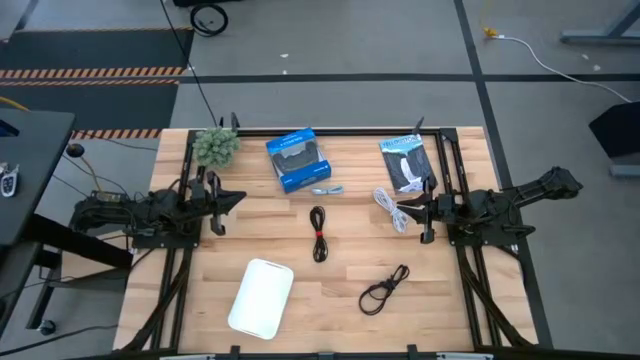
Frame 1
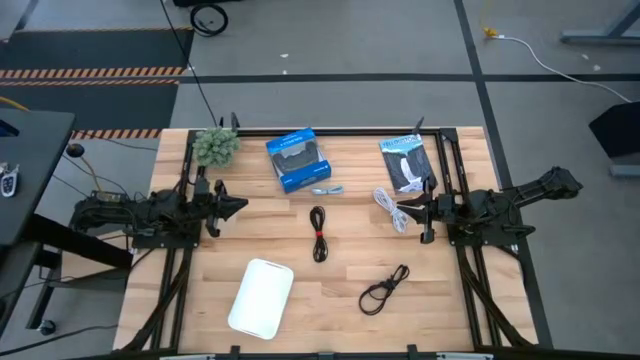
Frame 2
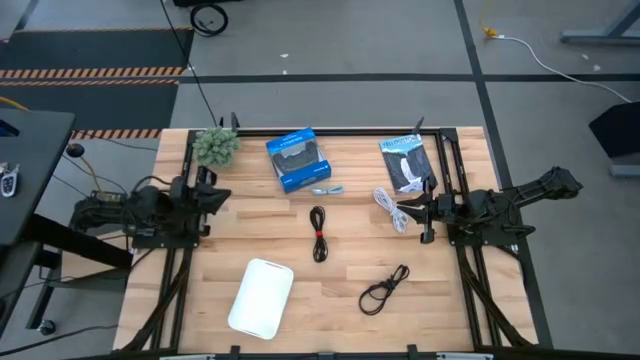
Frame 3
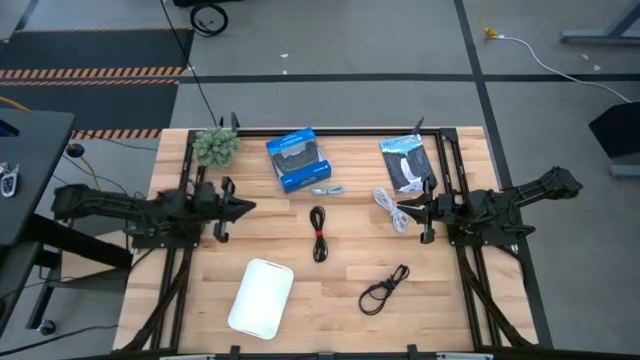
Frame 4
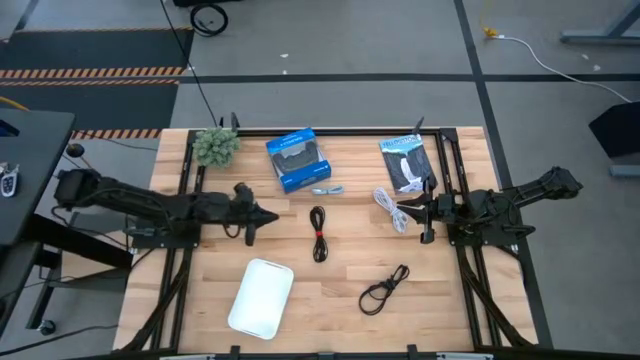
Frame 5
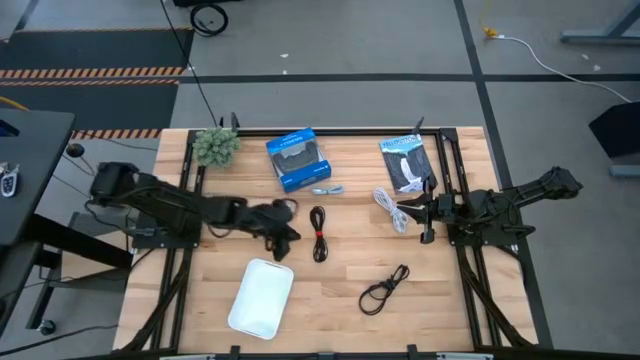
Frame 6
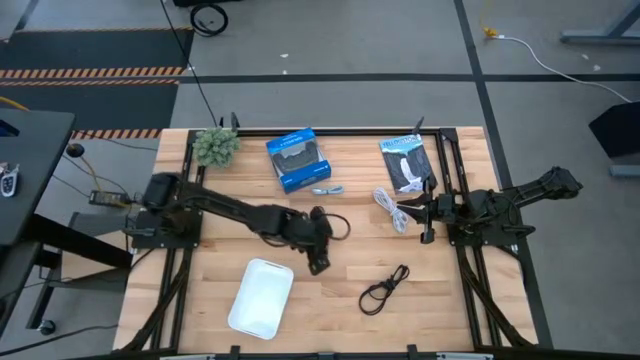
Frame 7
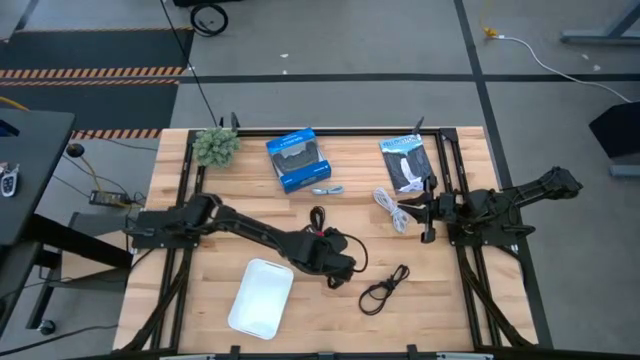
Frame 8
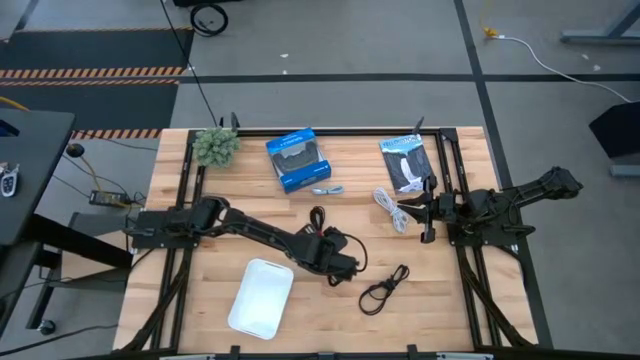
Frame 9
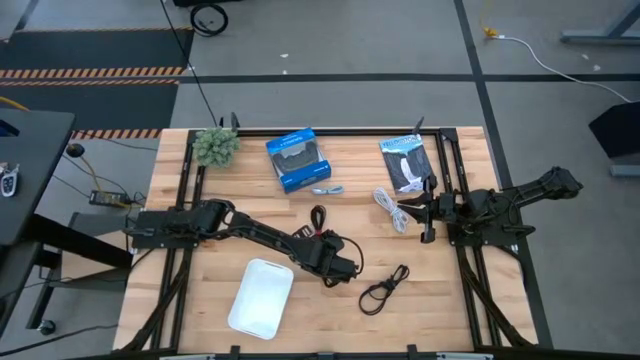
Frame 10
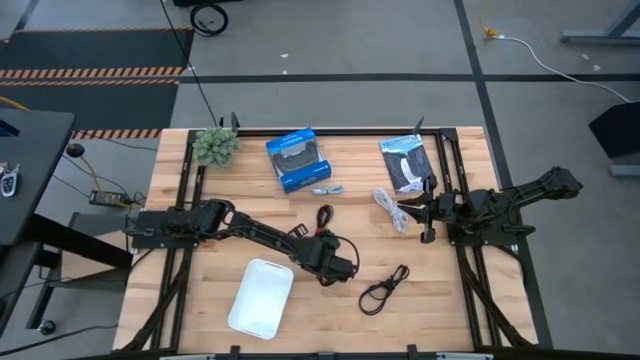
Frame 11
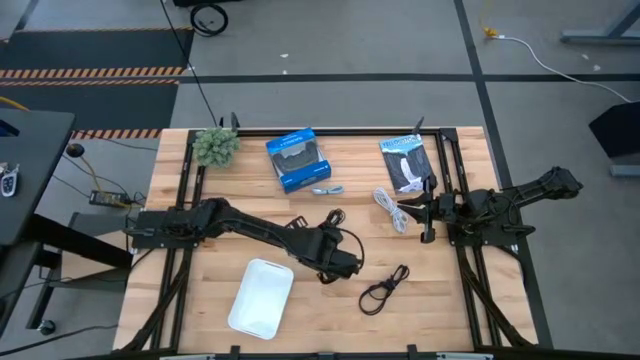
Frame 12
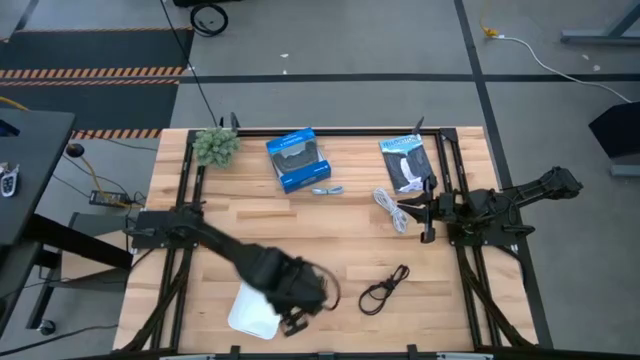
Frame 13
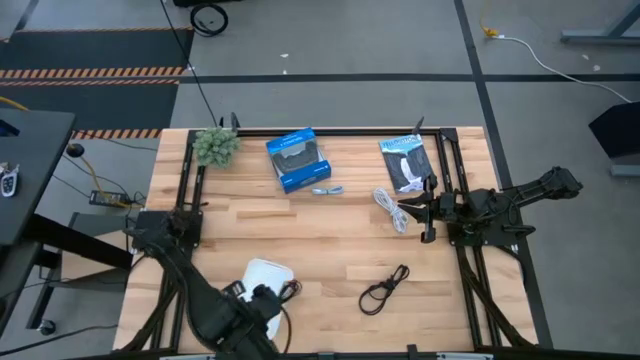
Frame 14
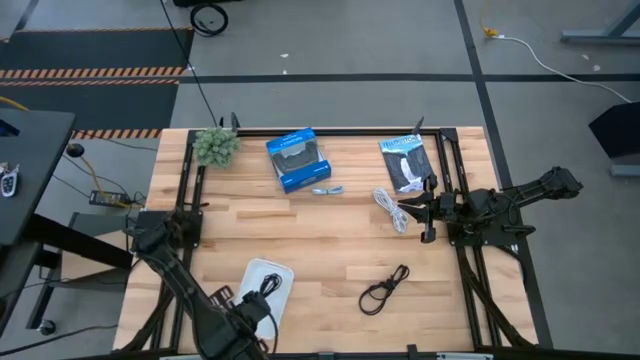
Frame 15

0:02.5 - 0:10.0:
Task: Pick and place USB-C Cables
Put the top black charger cable into the bin

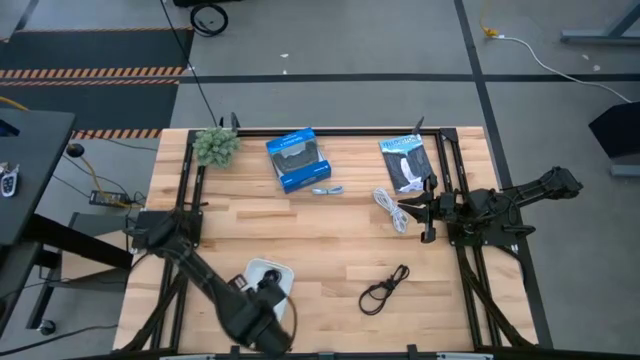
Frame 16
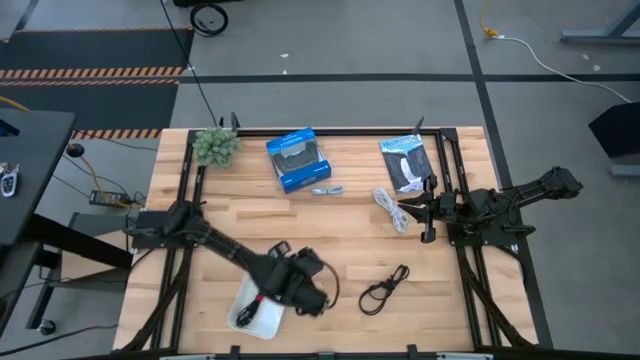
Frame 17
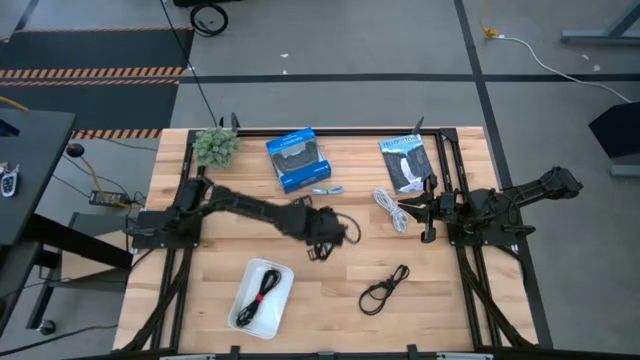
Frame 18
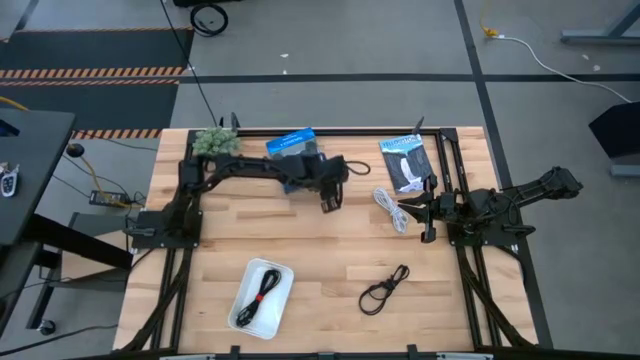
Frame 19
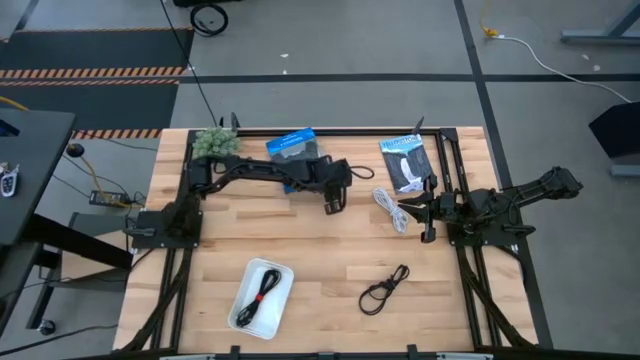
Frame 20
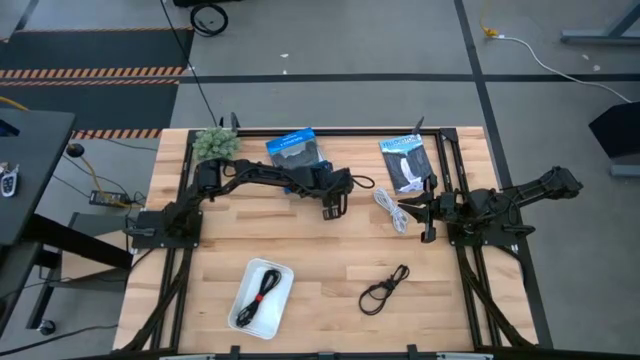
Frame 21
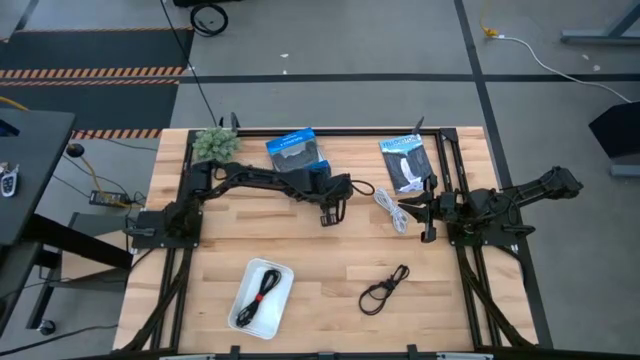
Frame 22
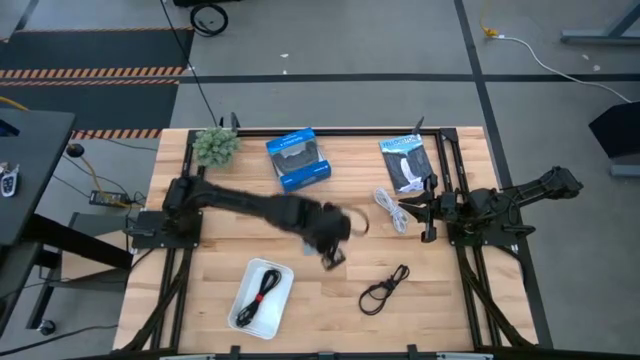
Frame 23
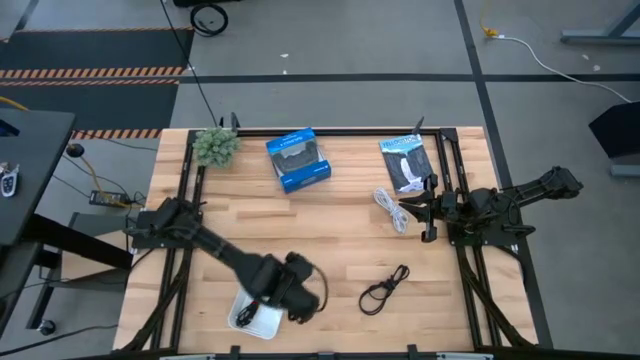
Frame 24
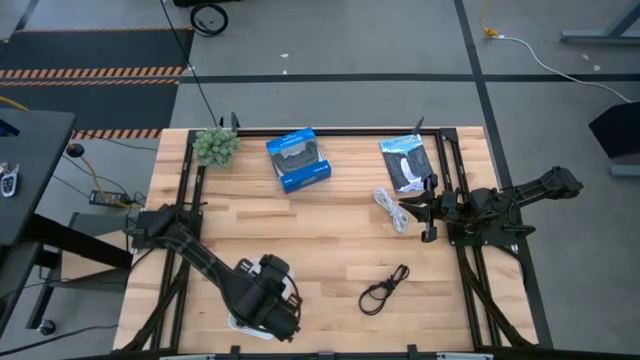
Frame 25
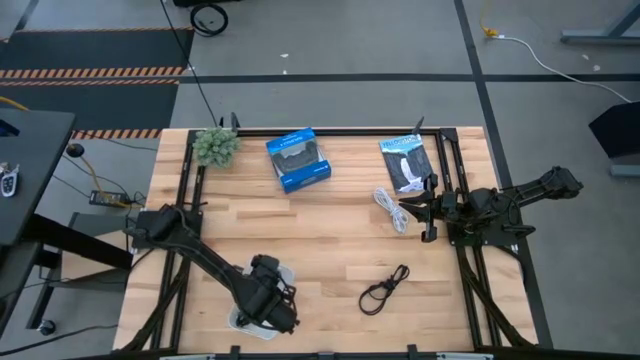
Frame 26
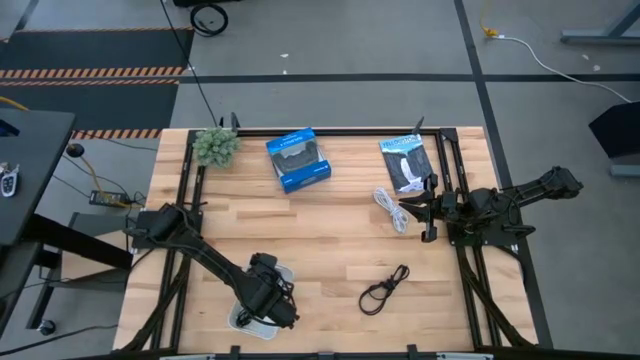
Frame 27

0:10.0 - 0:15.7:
Put the blue charger cable into the bin

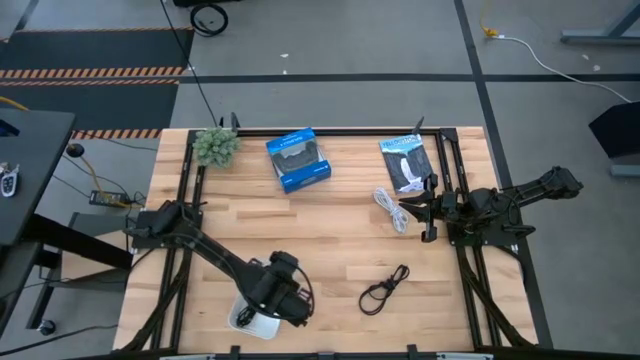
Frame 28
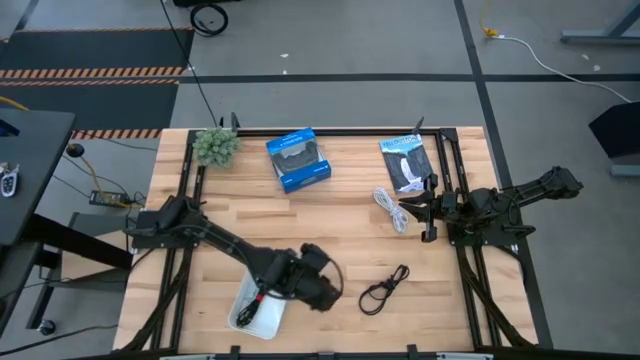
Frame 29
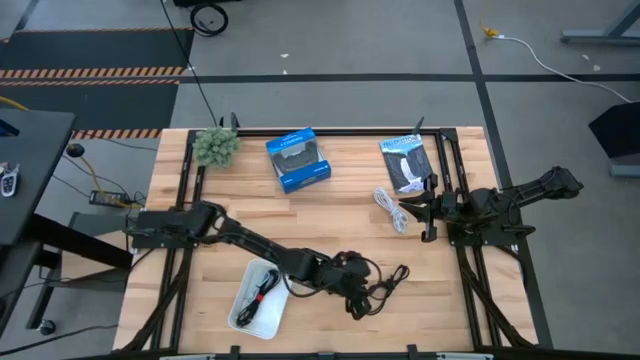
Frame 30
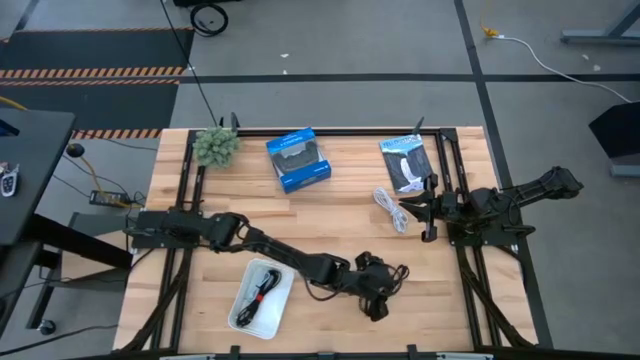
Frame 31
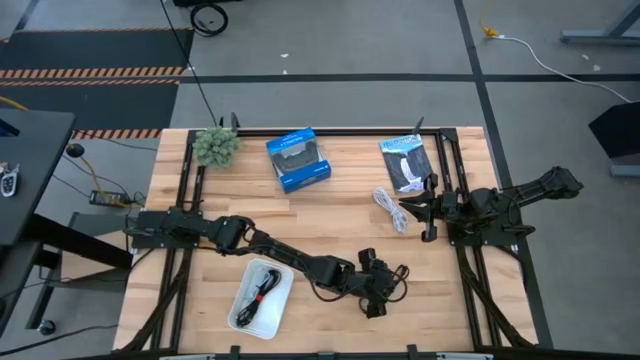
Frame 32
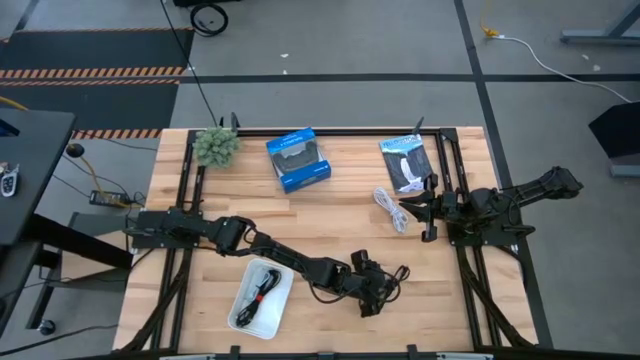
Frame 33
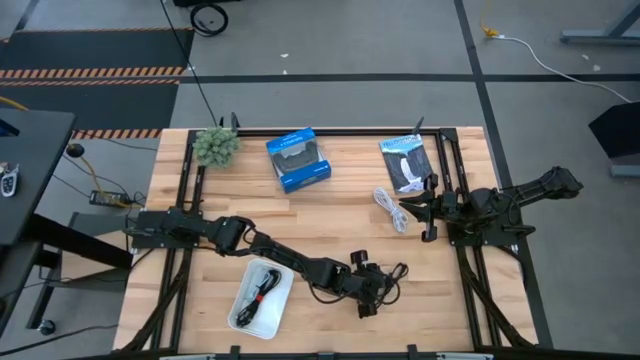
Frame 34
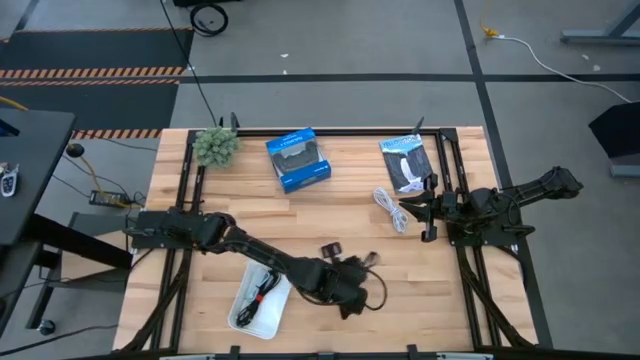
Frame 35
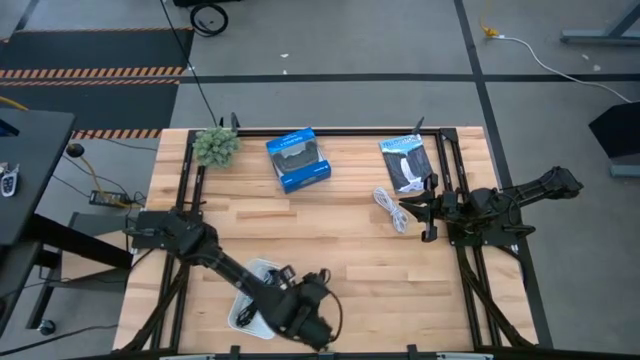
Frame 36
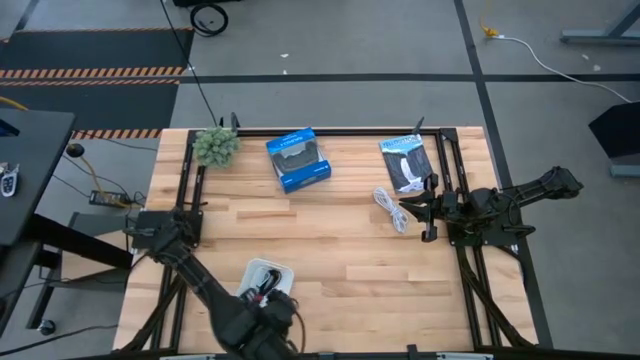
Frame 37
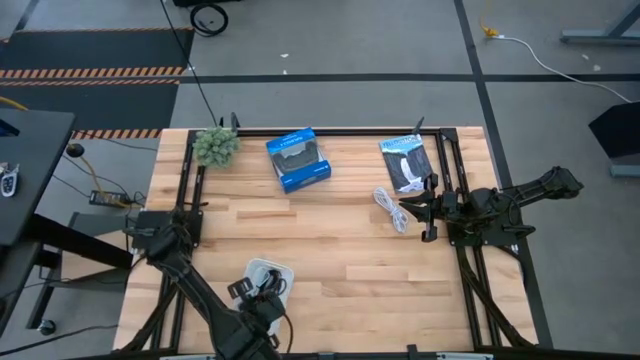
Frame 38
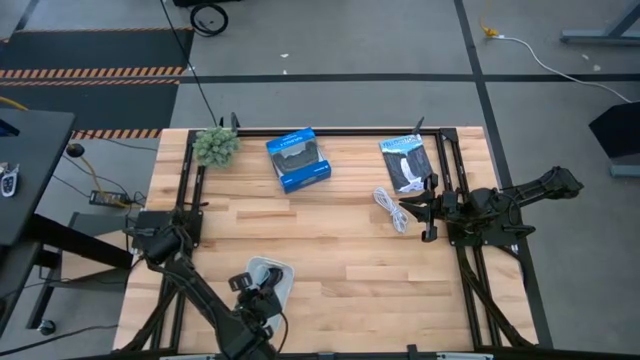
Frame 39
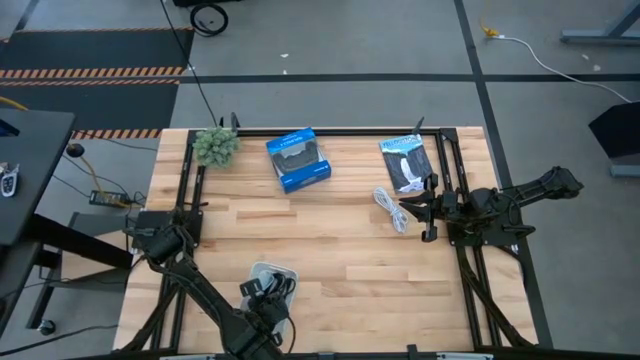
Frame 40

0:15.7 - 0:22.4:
Put the black charger cable into the bin

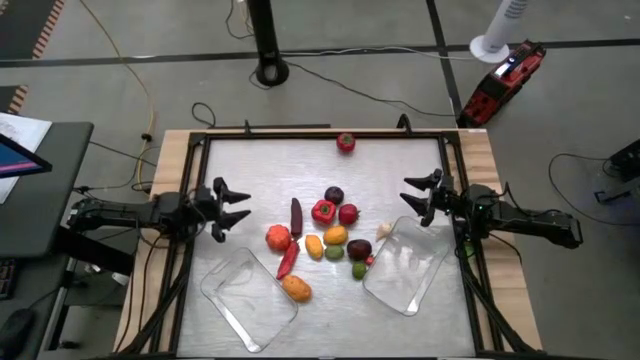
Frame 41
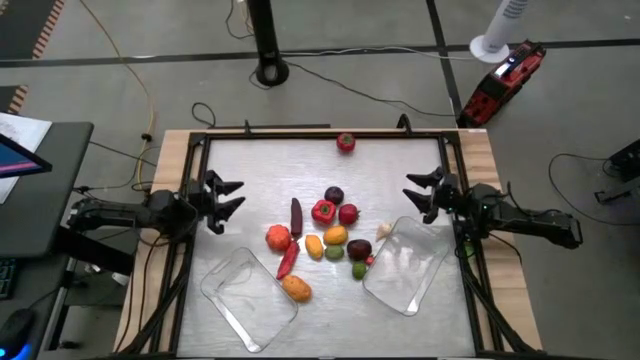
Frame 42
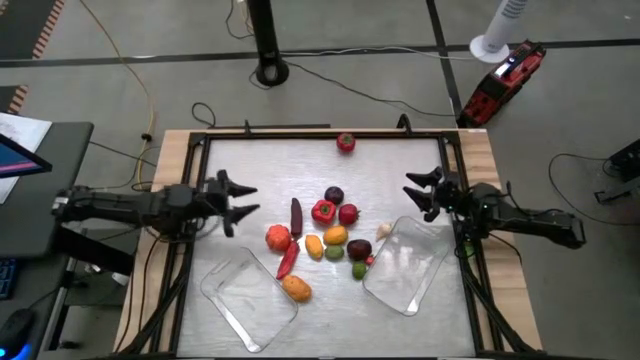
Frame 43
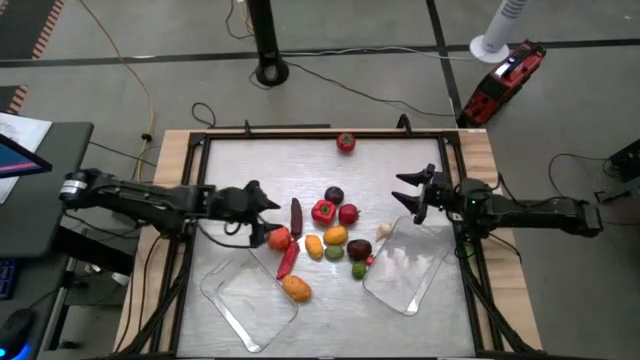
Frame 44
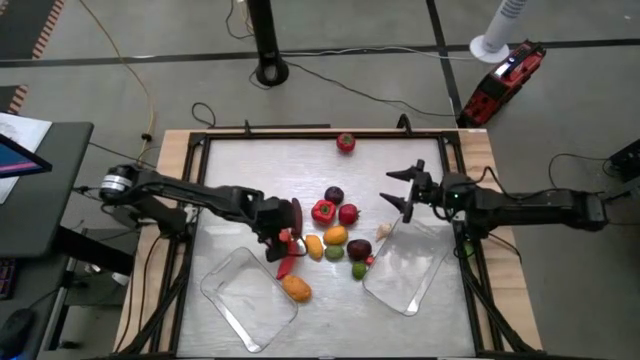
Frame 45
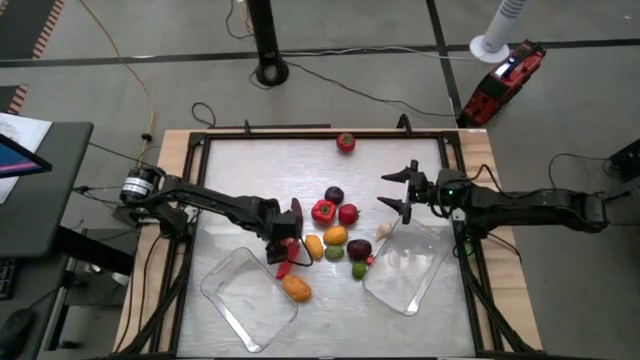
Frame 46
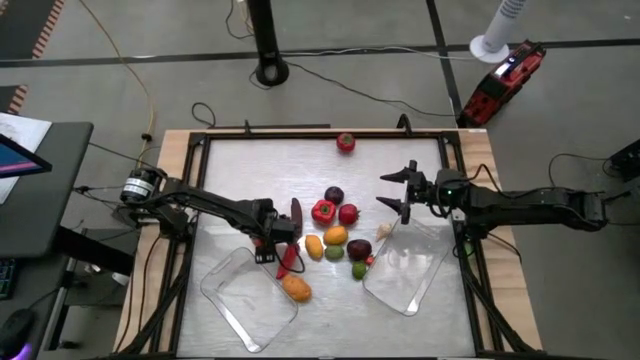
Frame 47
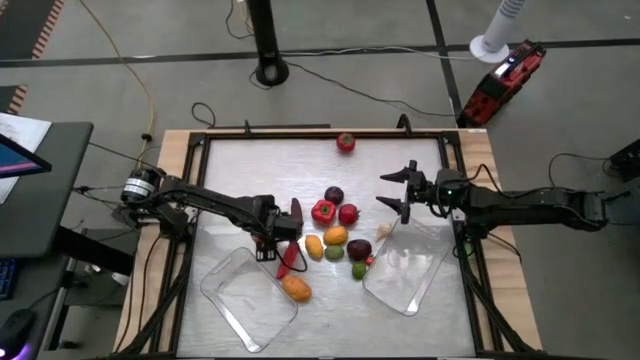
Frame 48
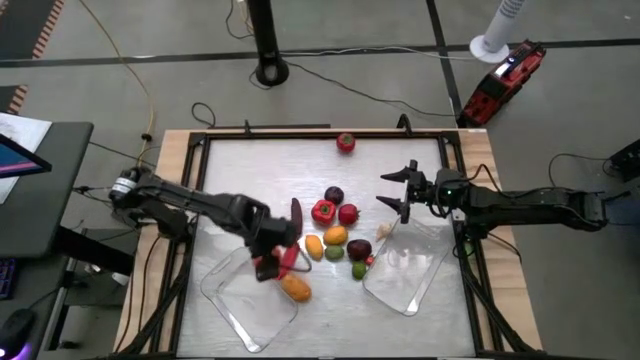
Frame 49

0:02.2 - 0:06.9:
Task: Sort produce into baskets
Put the orange pumpkin into the left transparent bin
